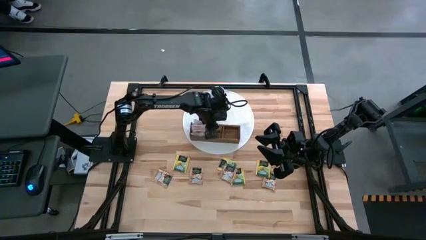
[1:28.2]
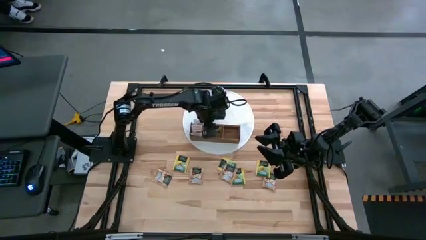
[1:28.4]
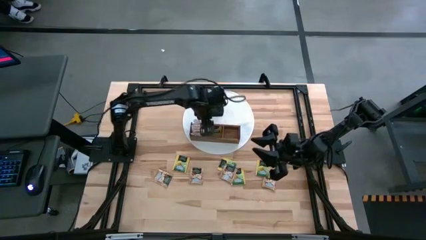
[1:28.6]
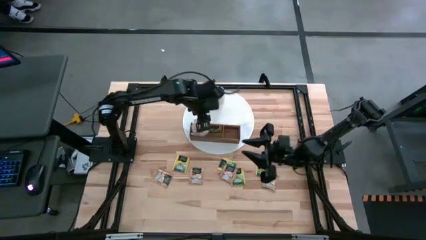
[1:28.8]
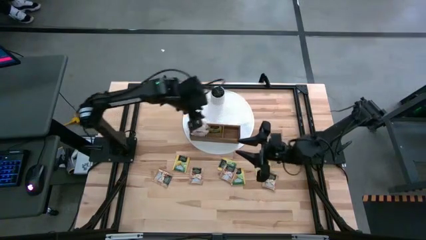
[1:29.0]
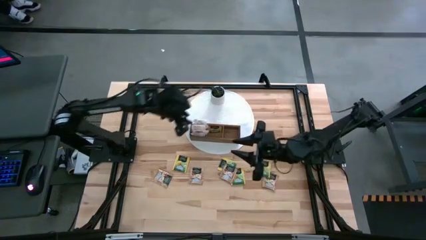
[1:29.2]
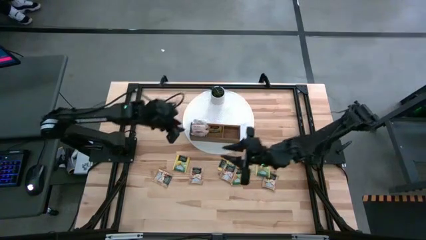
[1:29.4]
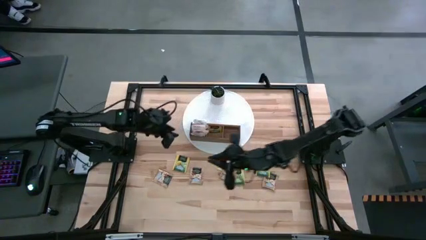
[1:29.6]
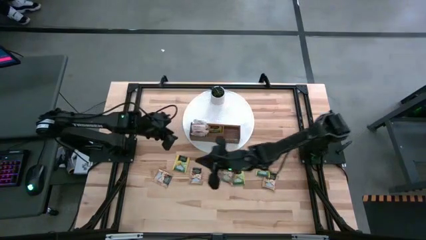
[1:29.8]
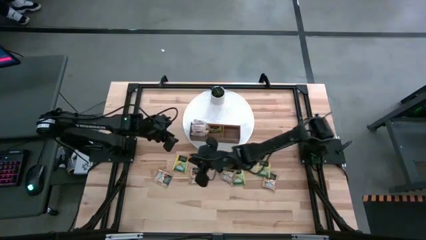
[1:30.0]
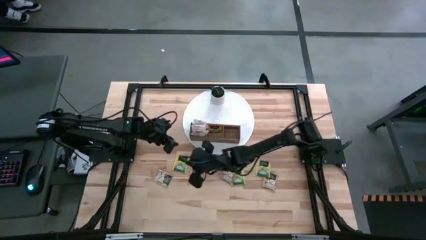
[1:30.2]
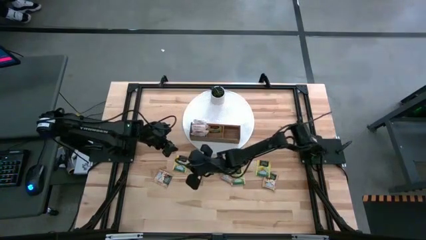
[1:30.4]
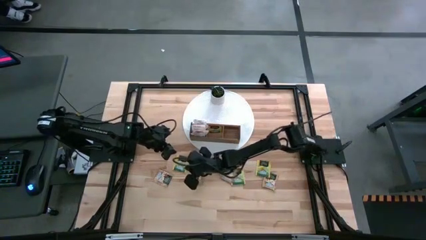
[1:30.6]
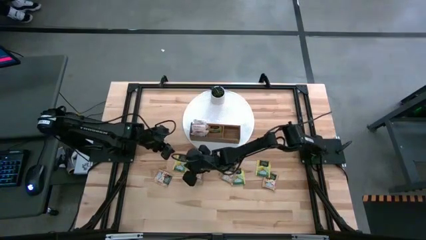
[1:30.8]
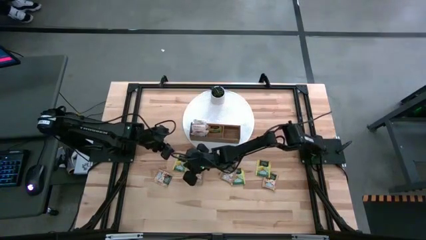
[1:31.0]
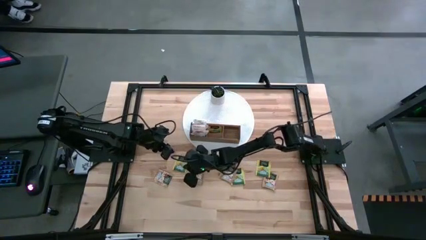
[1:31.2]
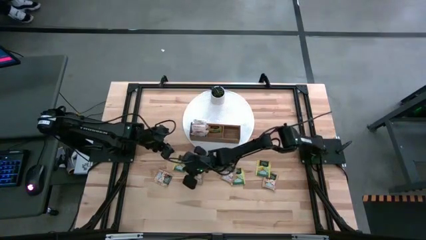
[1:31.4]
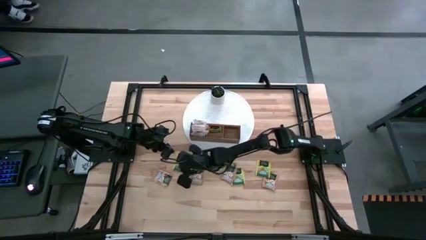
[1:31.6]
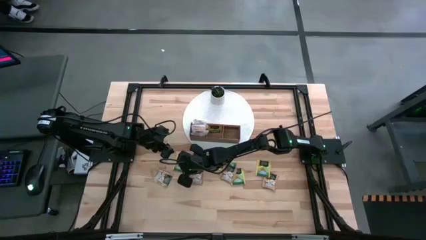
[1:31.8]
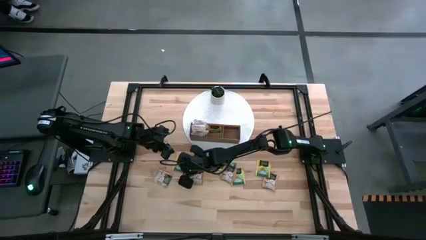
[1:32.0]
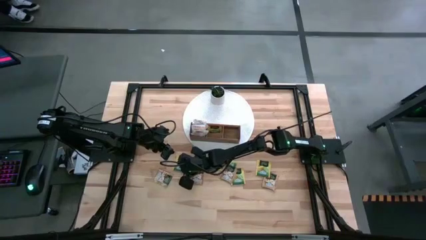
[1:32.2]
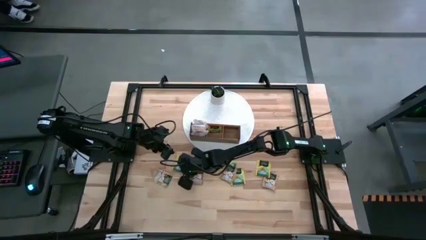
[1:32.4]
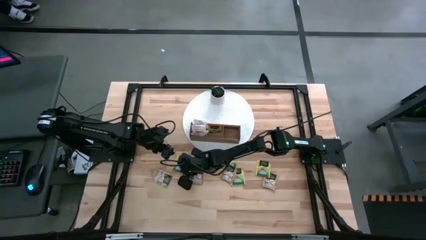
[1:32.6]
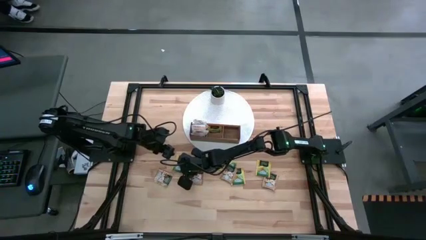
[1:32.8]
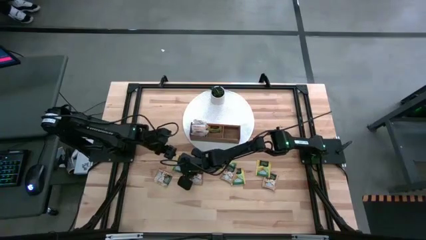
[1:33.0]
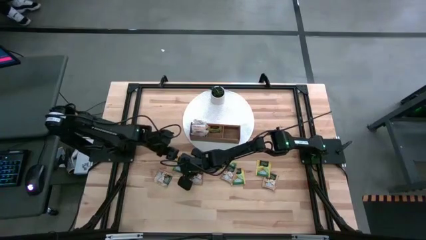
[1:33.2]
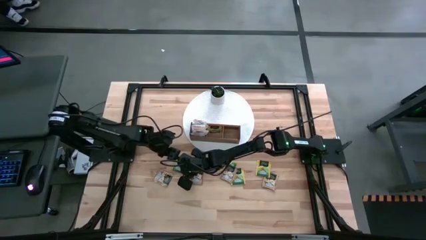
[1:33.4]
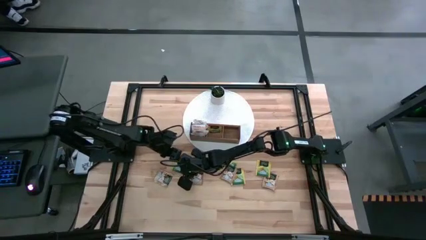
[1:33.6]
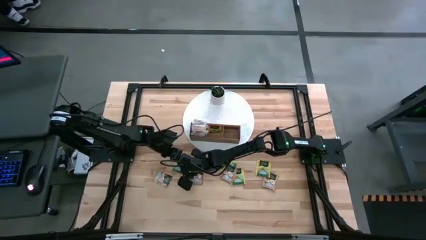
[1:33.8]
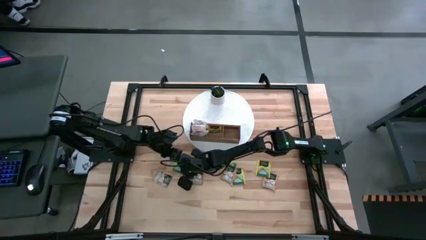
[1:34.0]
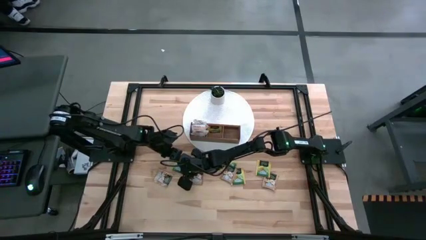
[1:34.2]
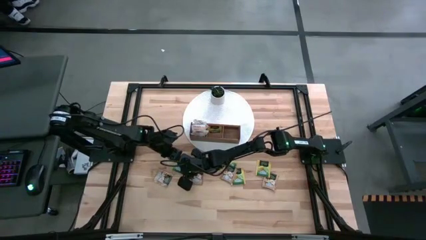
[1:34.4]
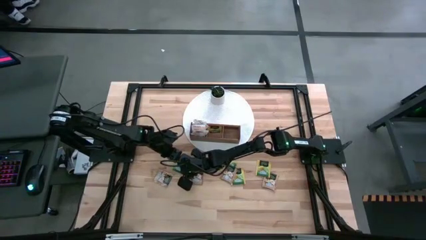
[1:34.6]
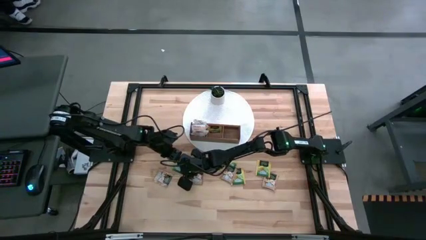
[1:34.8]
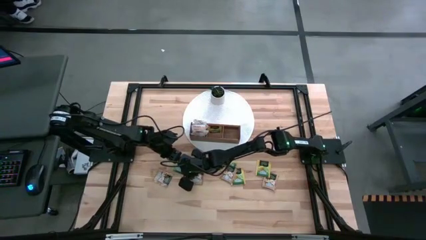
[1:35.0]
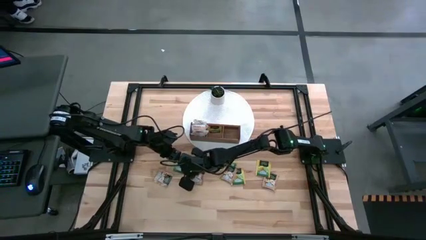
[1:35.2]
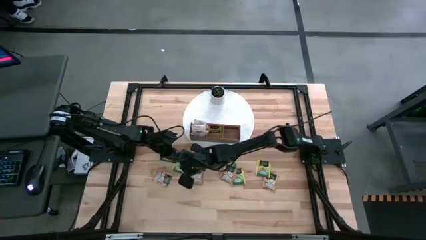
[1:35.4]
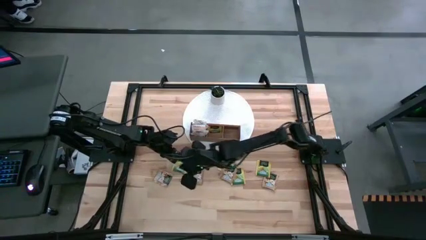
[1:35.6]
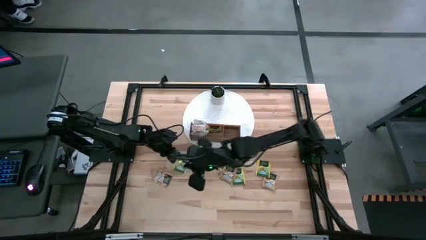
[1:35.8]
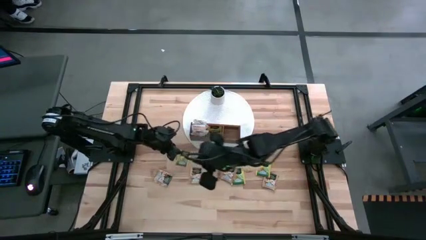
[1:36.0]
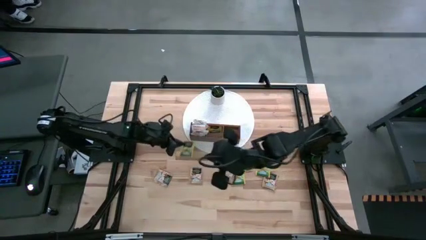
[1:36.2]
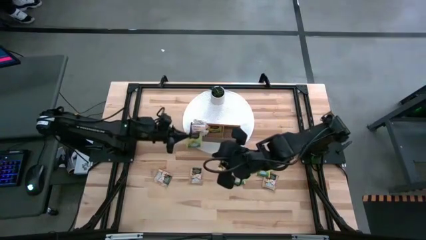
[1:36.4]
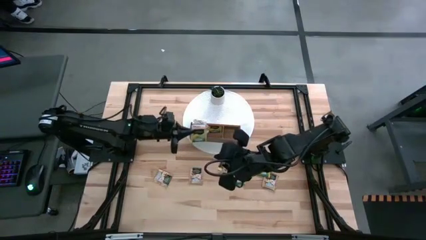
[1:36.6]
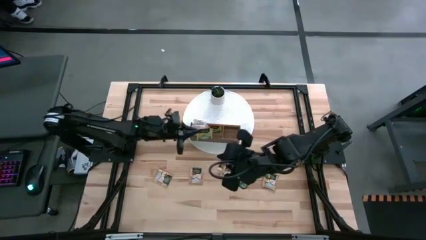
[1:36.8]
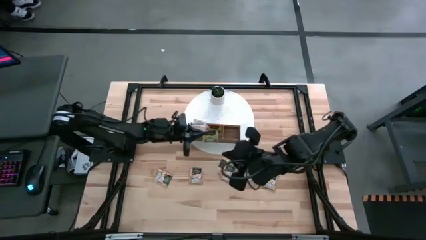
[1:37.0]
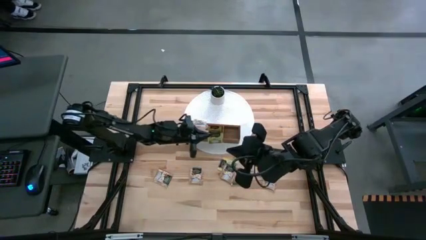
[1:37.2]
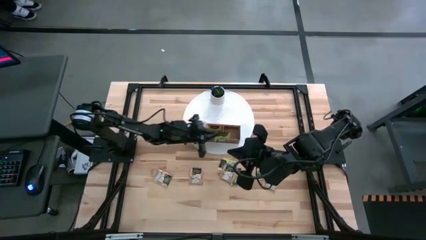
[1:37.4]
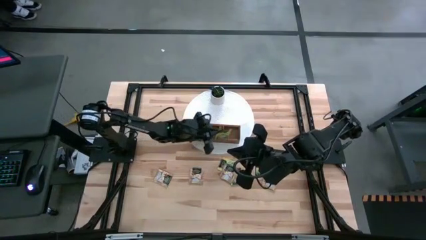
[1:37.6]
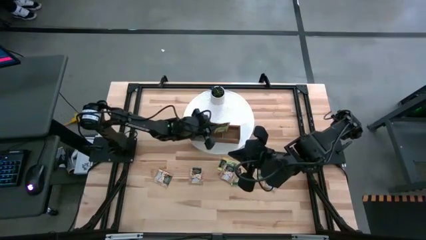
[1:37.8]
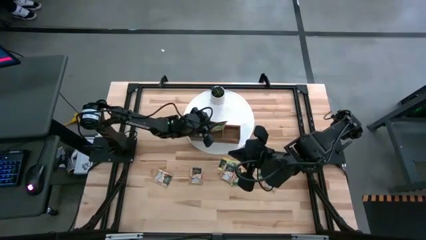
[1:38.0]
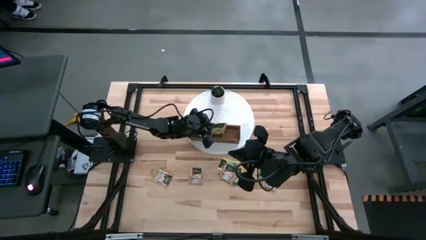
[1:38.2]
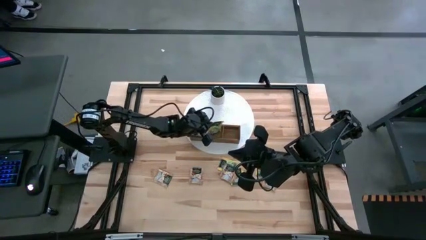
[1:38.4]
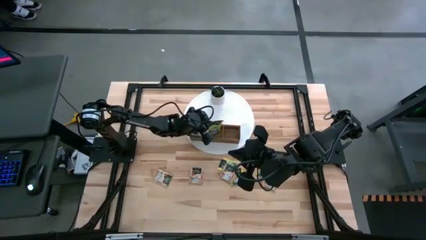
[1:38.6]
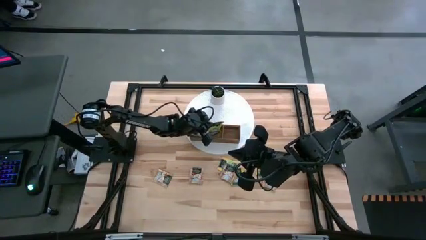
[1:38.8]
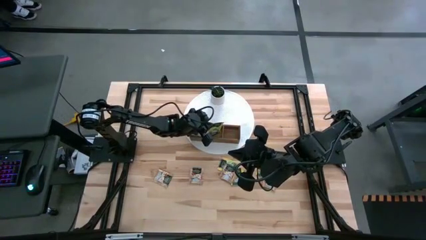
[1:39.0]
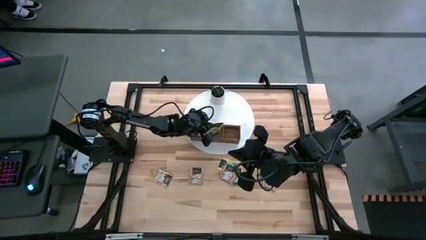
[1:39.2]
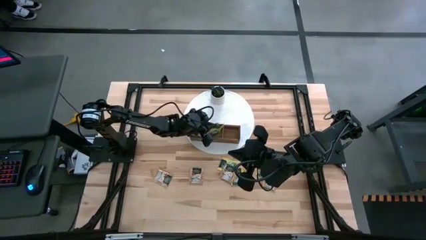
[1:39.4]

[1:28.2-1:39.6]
Task: Pick & Place Tea
Put the yellow tea bag into the middle section of the wooden organizer

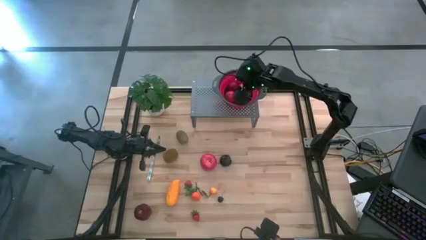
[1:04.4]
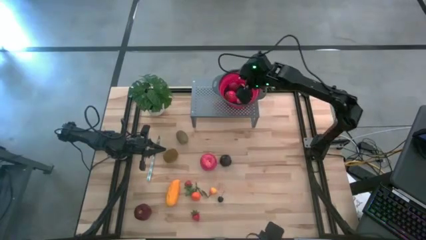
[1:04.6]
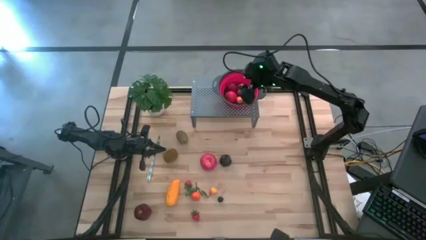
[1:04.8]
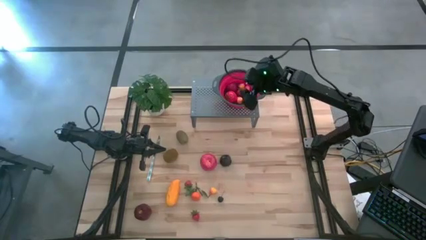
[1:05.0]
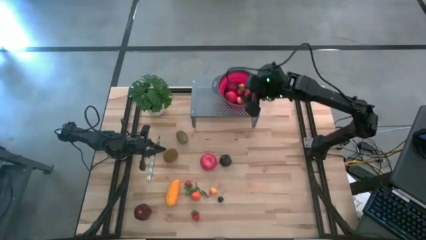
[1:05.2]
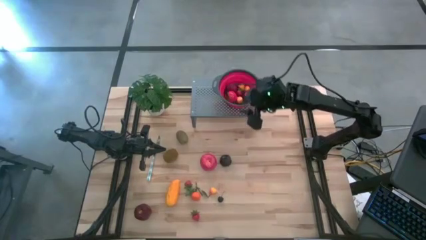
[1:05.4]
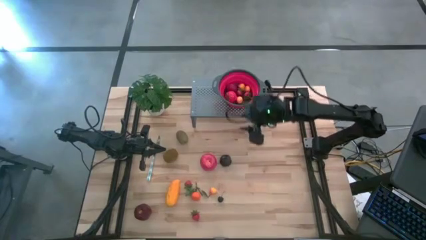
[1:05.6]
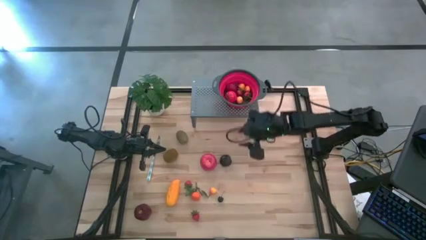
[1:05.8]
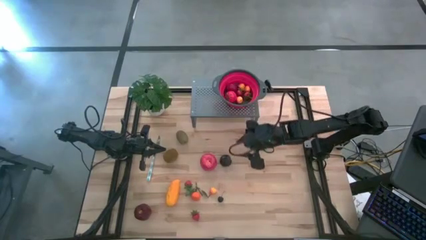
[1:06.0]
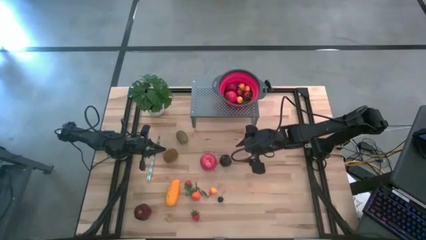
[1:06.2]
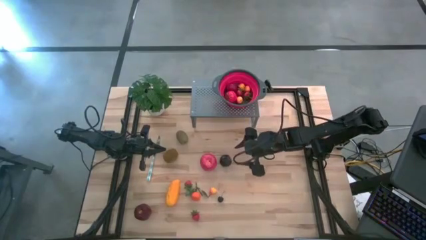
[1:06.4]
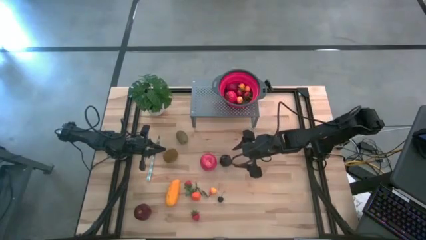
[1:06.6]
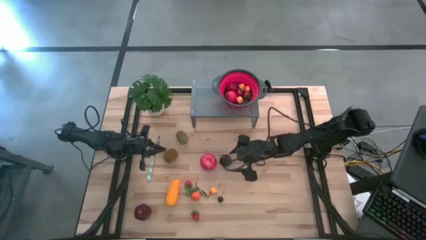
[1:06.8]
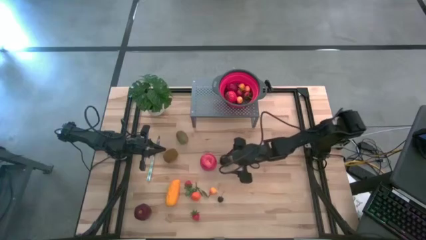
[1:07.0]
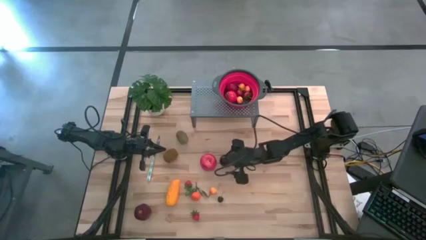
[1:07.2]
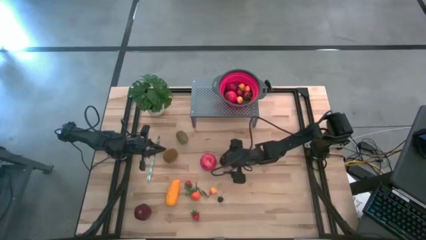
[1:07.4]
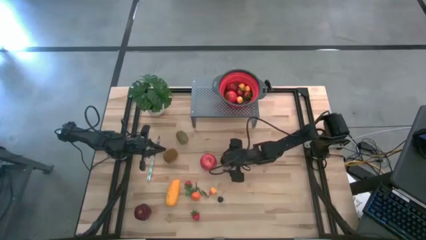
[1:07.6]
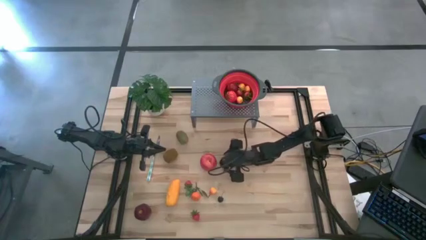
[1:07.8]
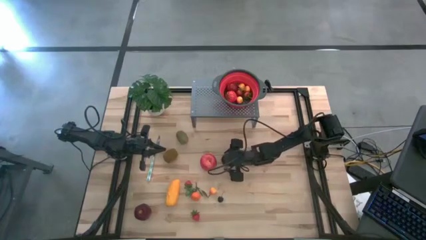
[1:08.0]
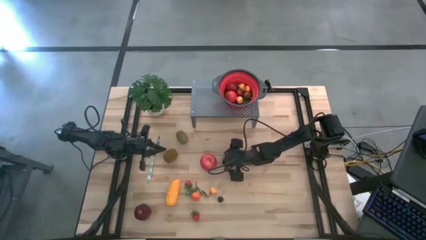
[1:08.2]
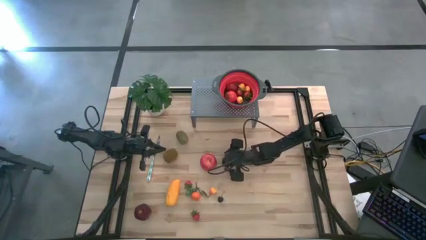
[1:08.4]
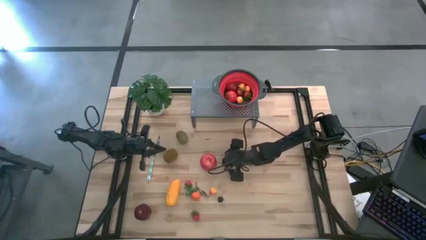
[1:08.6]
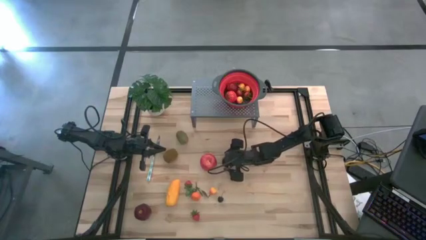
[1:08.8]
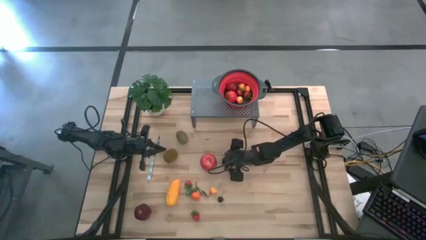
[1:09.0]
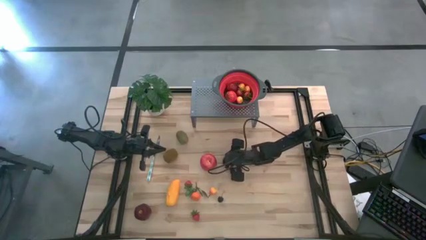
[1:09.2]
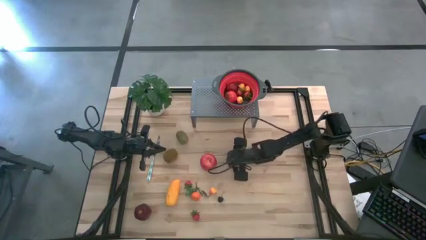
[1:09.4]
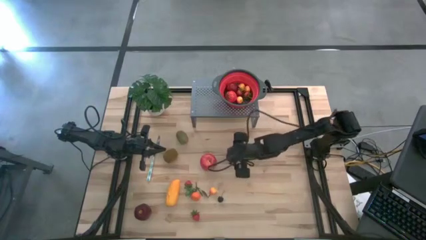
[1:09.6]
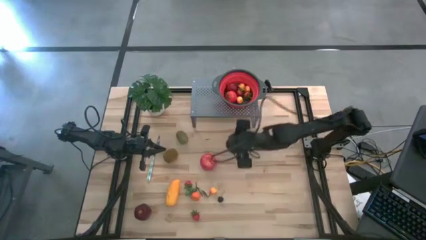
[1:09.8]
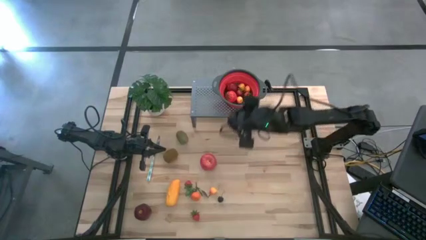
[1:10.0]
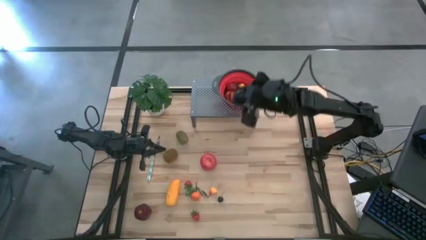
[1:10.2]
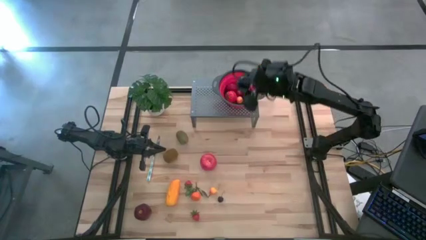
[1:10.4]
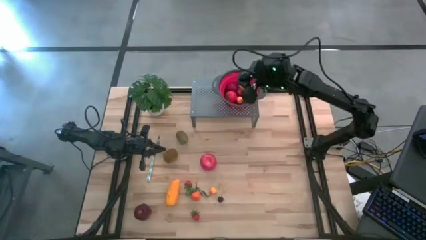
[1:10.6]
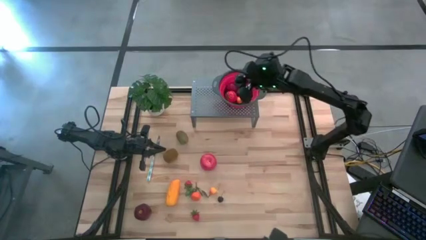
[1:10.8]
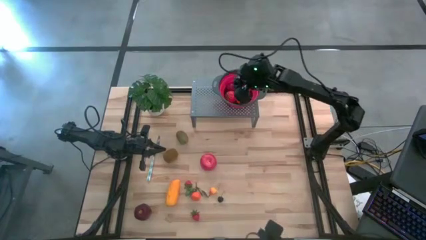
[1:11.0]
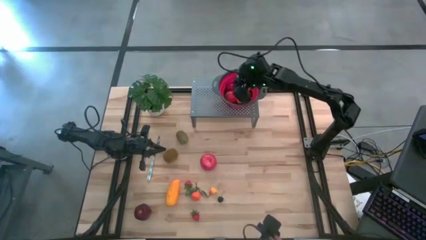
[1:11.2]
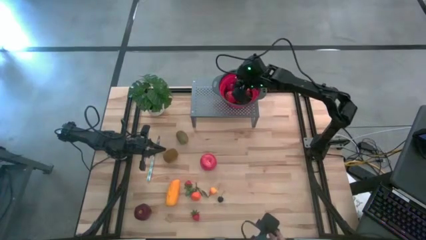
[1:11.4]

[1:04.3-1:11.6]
Task: Pick & Place Fruit
Put the black plum into the strainer bowl on the shelf
